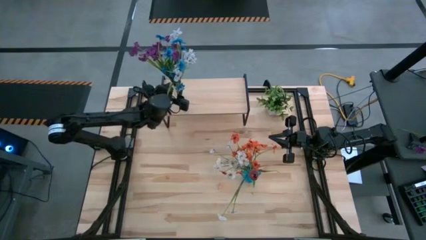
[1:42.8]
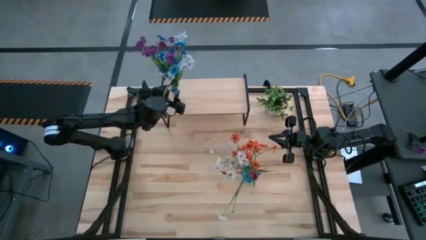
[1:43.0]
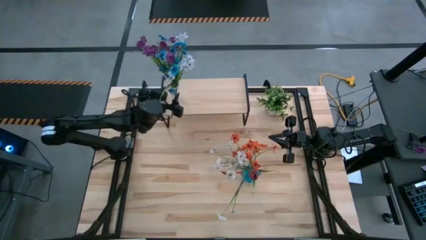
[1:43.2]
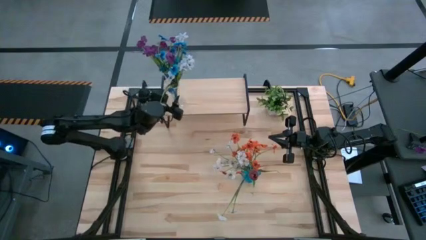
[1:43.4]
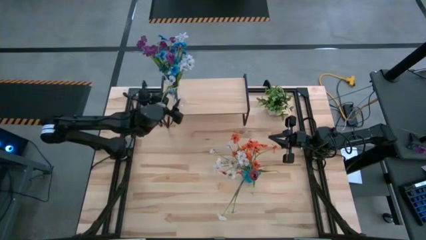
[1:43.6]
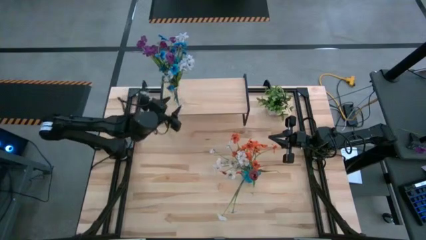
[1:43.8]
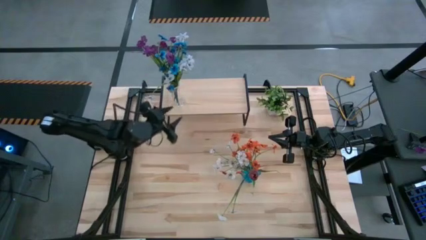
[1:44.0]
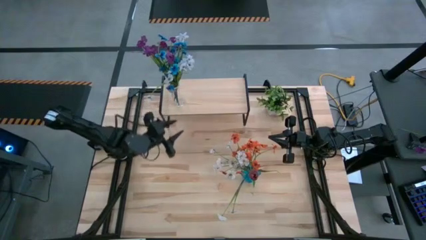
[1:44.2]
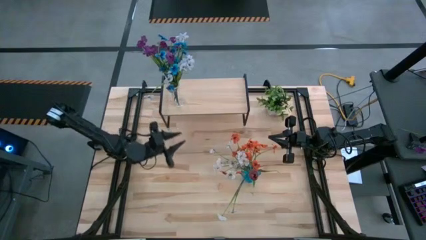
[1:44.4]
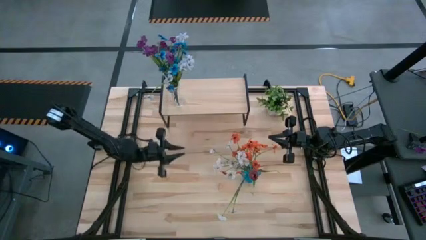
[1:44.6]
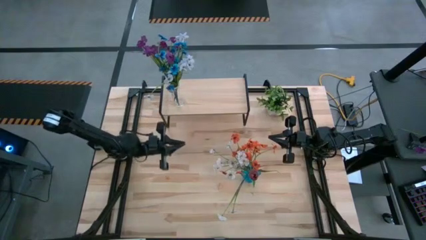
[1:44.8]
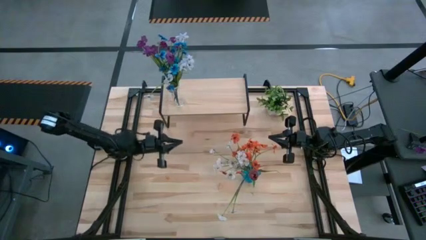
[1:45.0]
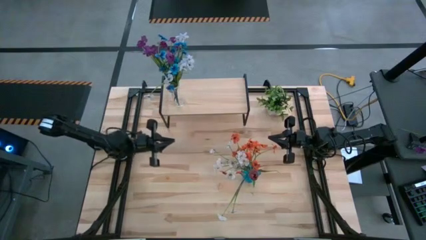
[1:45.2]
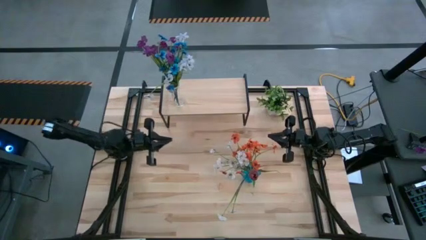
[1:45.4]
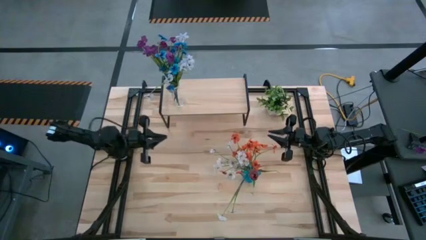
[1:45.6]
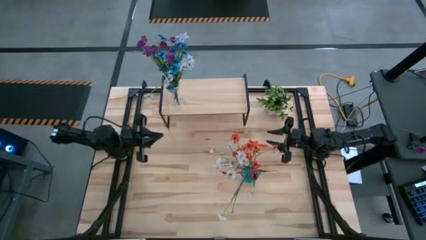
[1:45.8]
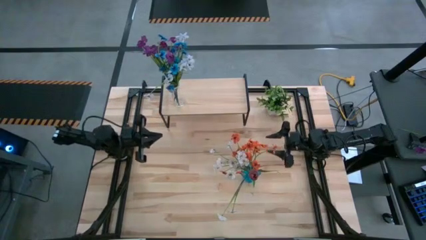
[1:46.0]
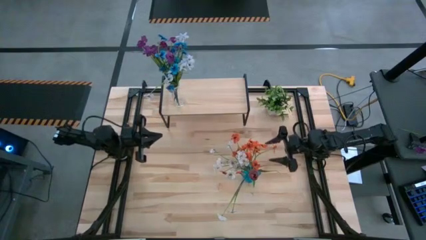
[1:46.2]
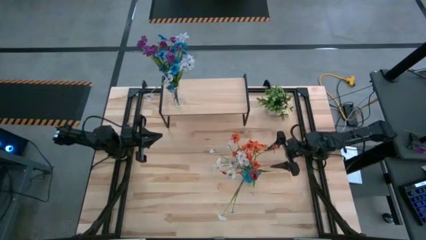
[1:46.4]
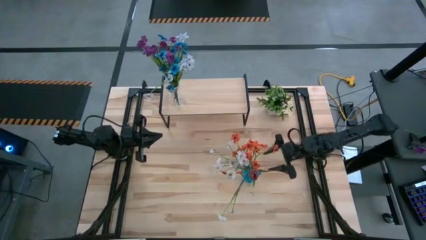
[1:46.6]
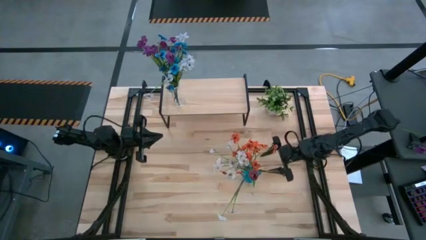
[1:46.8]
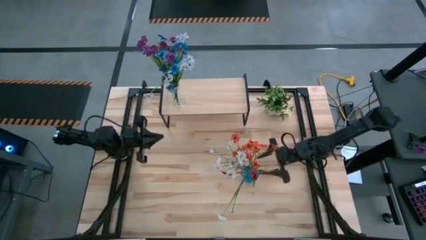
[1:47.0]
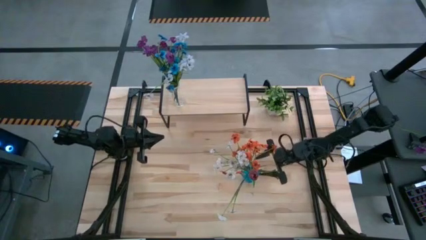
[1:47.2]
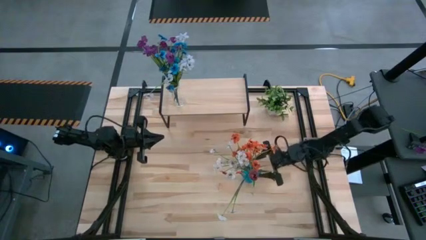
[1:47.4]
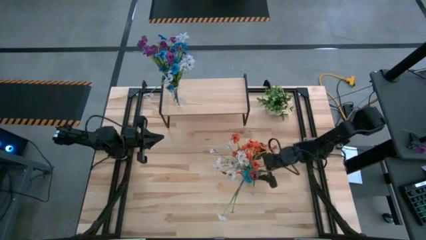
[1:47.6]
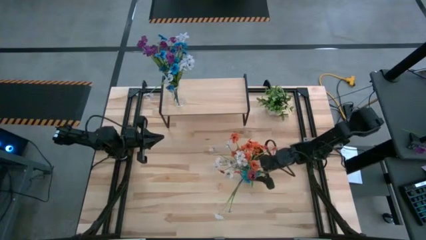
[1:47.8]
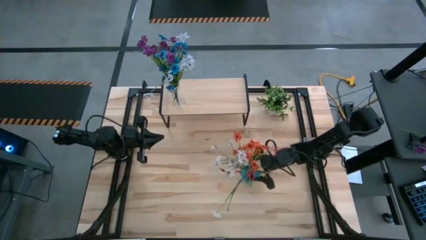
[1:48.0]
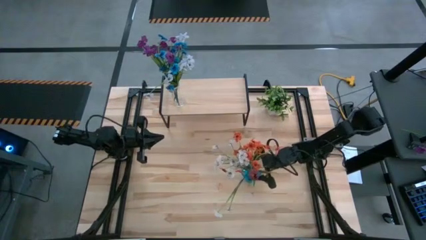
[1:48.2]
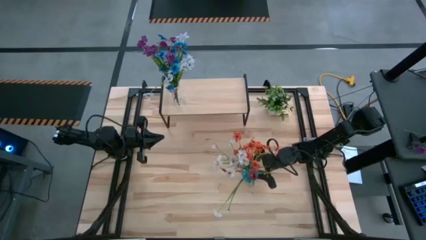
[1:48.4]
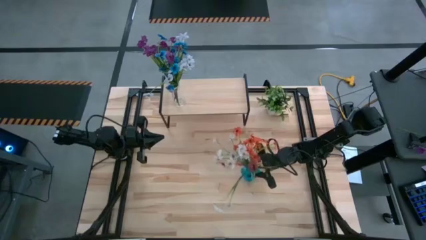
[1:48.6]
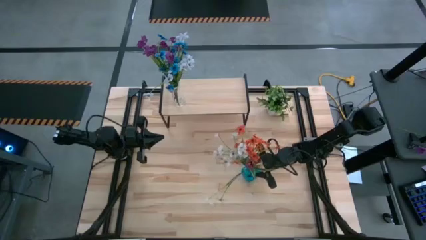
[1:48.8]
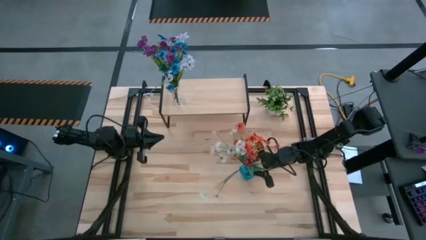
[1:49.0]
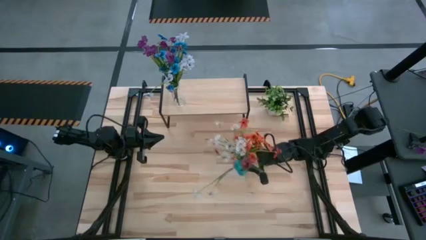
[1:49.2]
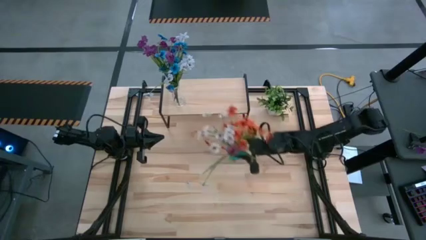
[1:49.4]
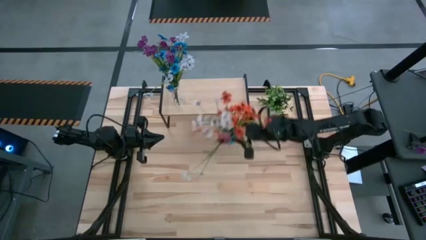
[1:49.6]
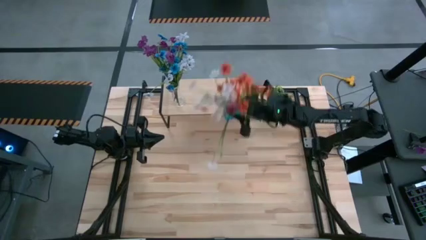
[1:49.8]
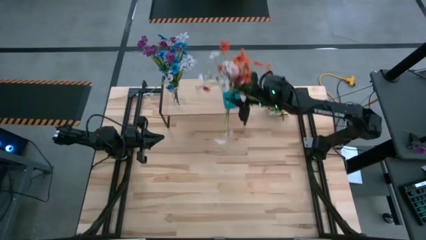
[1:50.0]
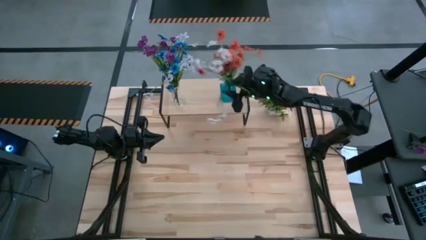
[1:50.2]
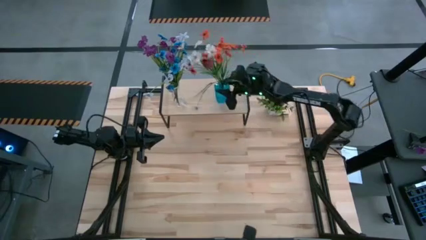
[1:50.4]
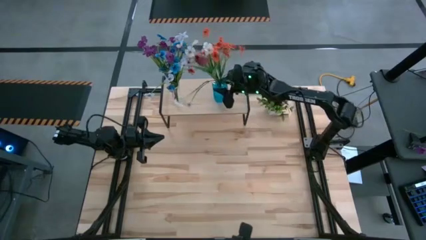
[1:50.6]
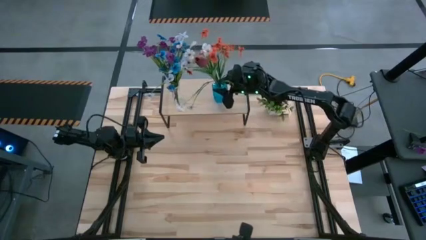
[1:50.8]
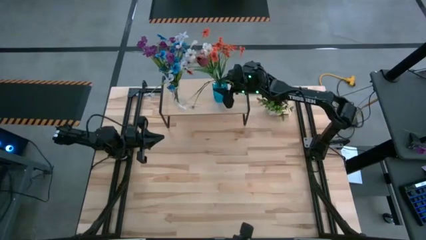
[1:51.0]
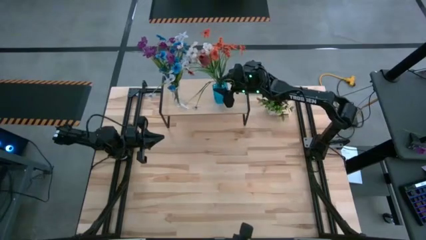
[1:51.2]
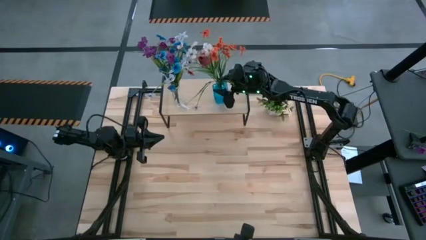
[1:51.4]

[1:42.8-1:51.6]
Task: Pick and place flowers into a vace then onto a shelf
Put the blue vase on the shelf

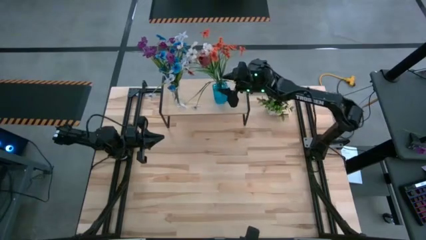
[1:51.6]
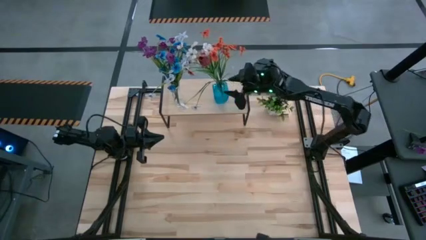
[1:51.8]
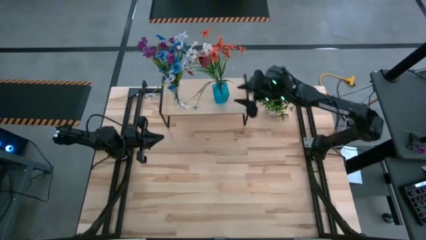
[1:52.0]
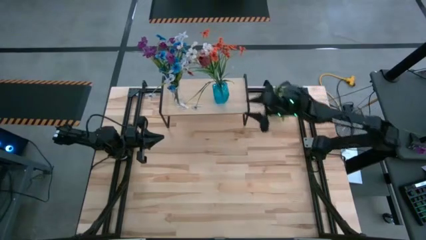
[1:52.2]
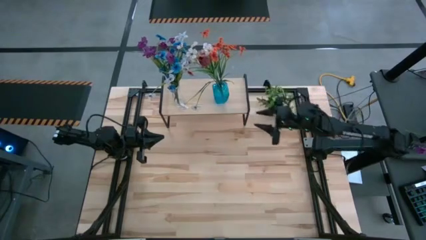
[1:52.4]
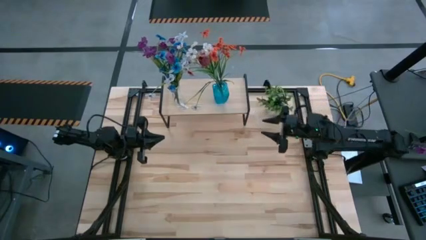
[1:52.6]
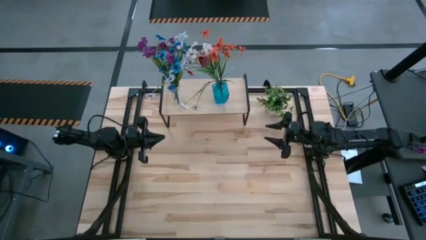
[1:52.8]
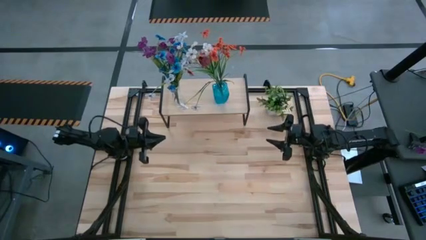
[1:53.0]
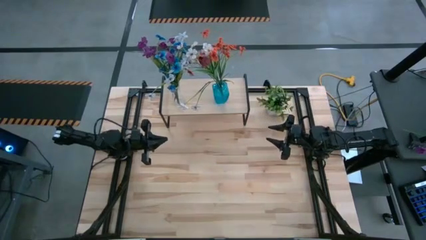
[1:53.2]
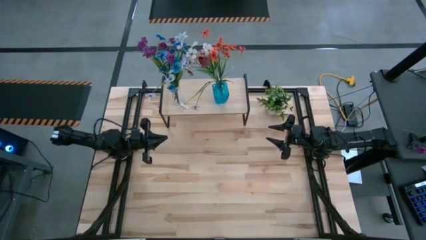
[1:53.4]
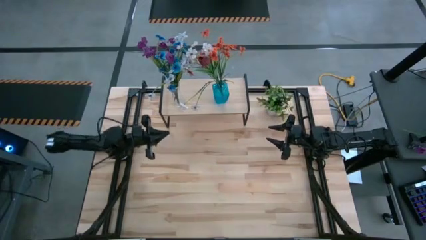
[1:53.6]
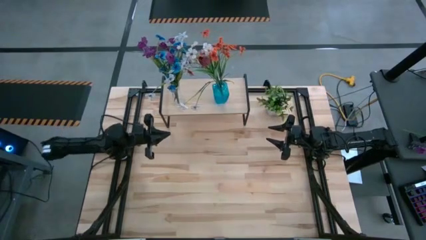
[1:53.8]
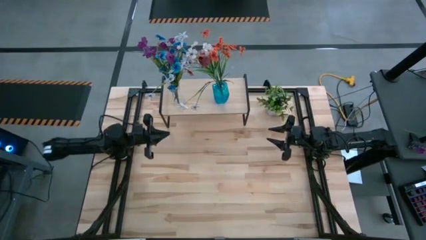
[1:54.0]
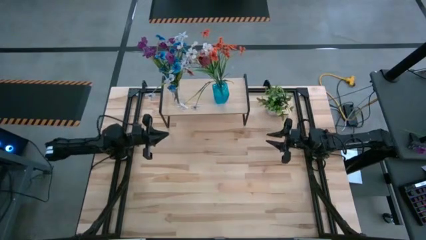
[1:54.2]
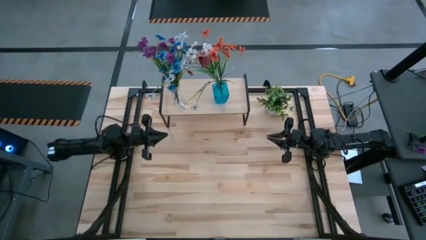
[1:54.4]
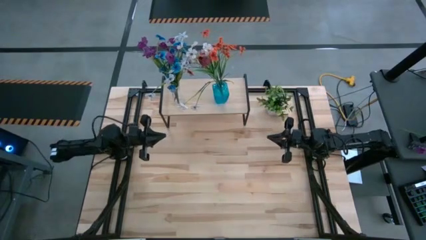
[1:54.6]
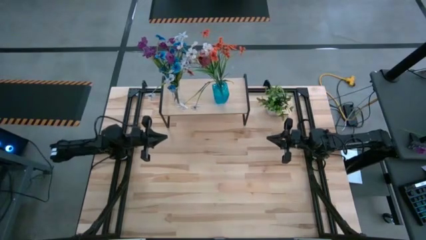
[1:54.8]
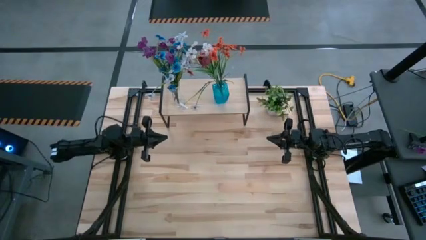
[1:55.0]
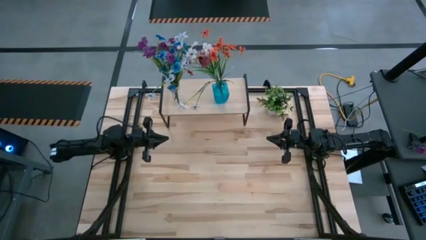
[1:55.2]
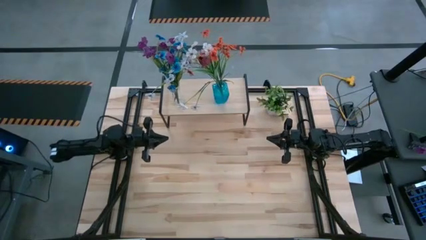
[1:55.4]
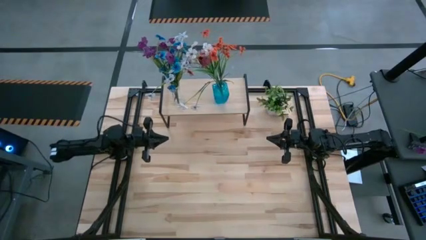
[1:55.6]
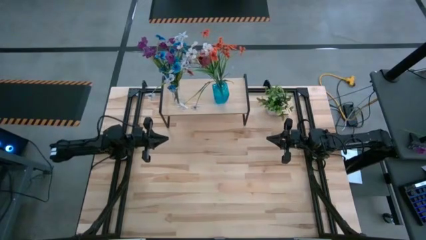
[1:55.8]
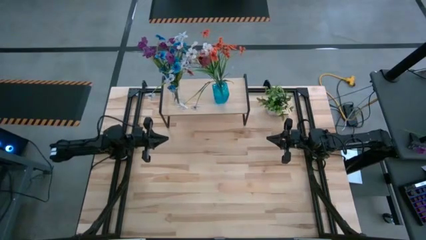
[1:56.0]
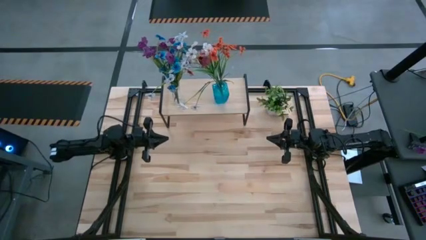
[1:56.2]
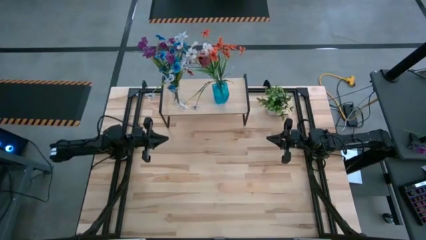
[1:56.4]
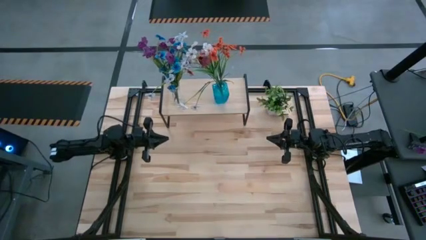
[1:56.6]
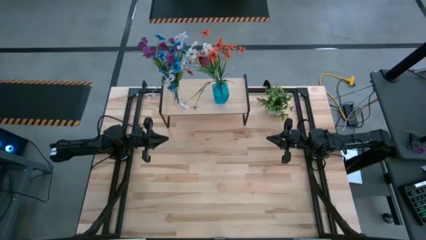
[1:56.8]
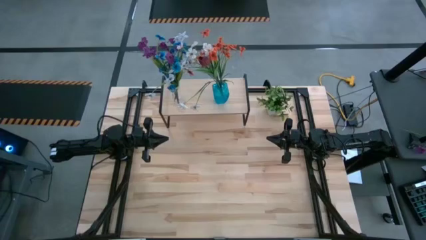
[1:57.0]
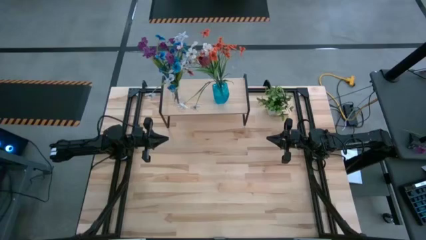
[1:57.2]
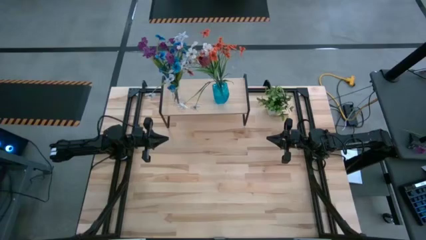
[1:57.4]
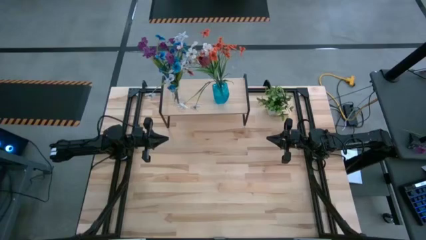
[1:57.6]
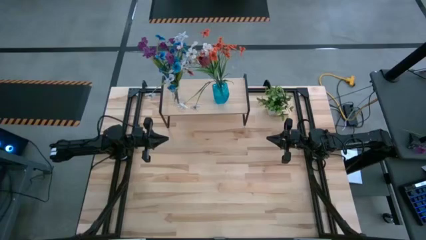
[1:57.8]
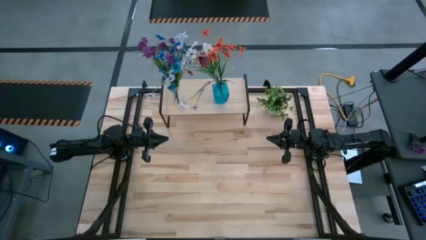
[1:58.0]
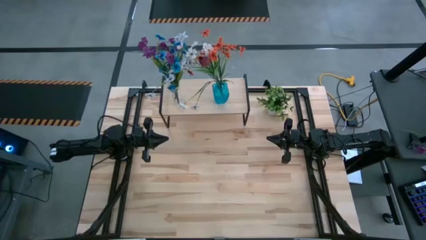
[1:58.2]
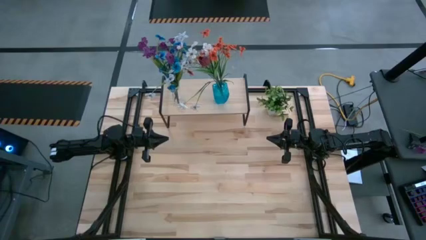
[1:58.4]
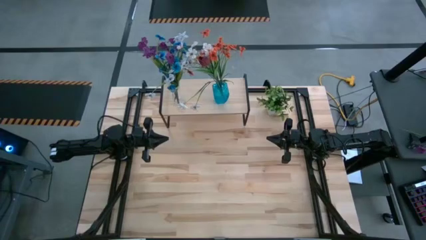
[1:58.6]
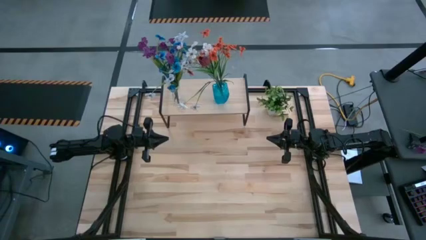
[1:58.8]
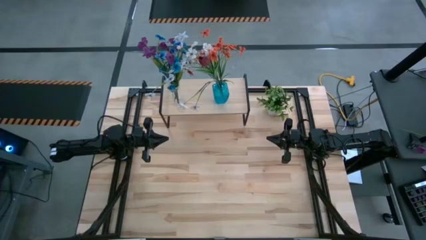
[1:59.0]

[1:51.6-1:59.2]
Return to Home Position

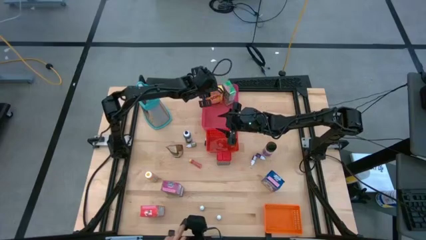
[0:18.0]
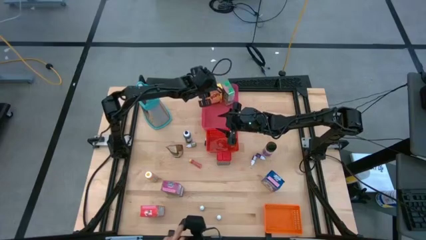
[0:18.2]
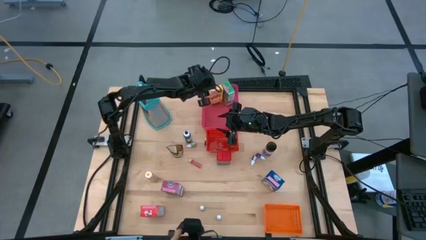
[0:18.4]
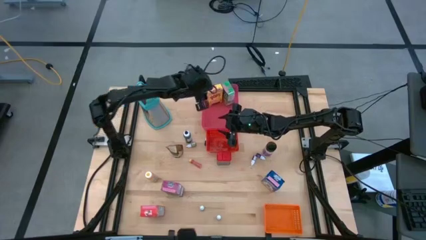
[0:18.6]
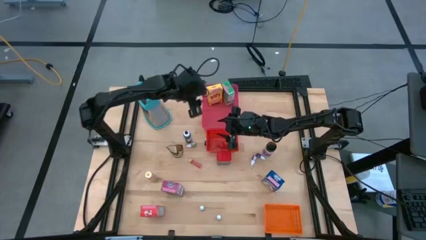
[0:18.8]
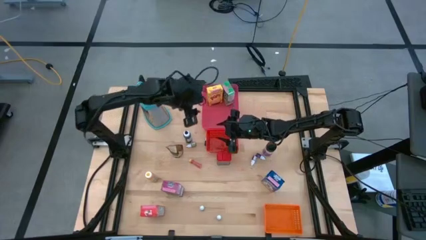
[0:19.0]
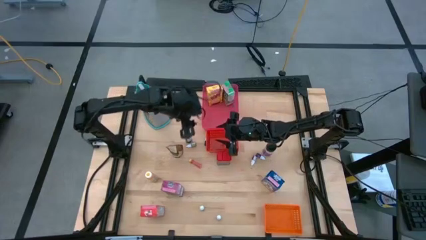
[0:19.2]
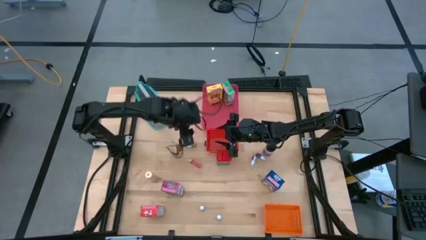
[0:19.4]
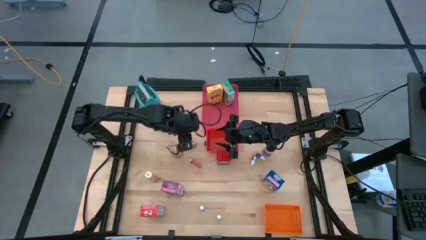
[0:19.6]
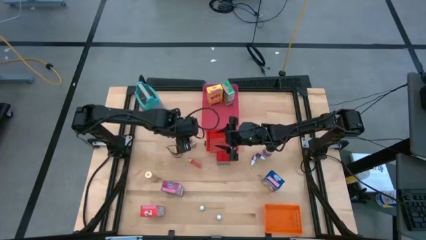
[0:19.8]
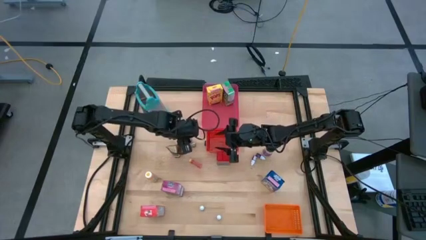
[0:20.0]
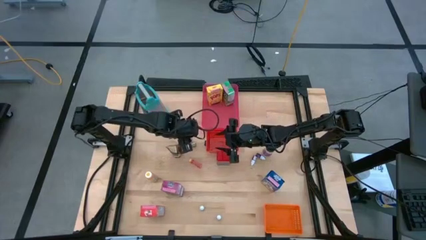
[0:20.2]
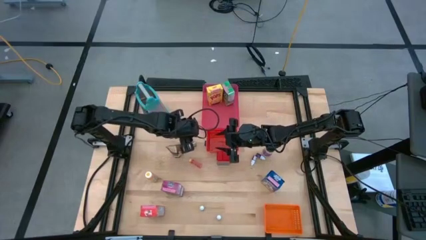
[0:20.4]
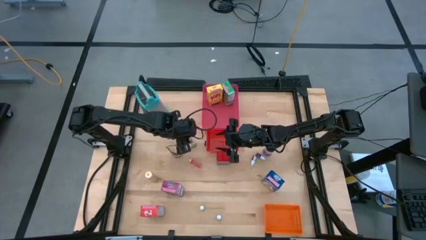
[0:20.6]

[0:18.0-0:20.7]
Task: Pick & Place Kitchen Items
Put the black food coloring bottle into the orange bin
